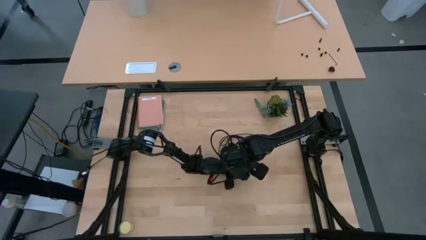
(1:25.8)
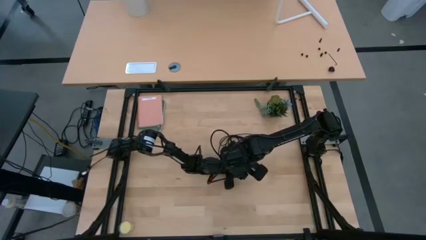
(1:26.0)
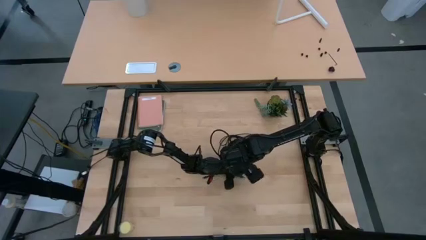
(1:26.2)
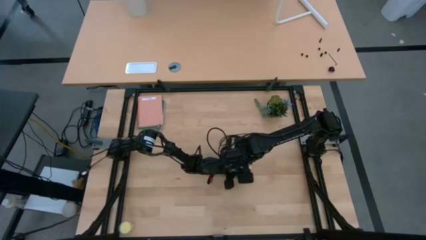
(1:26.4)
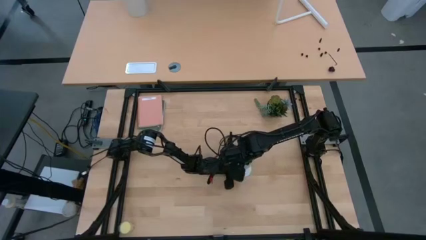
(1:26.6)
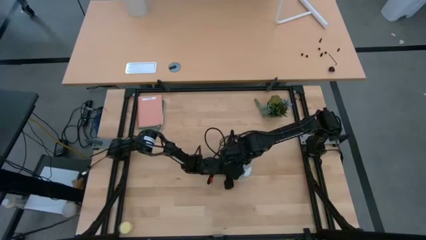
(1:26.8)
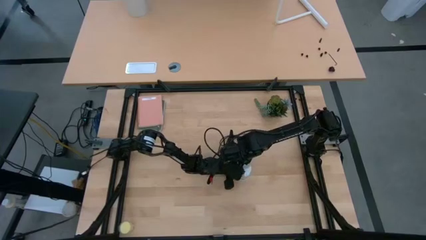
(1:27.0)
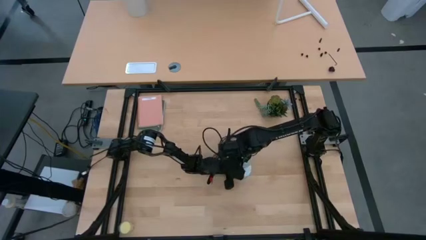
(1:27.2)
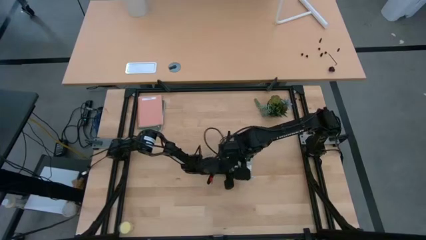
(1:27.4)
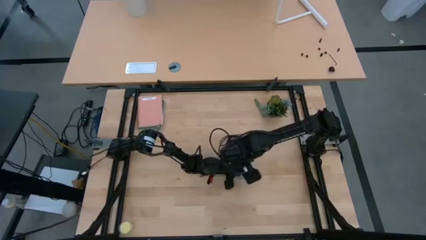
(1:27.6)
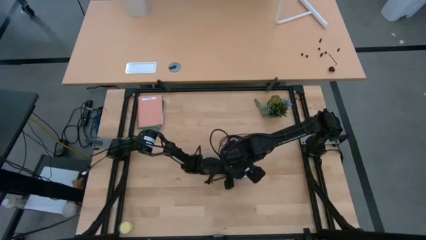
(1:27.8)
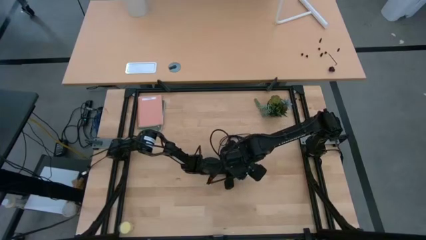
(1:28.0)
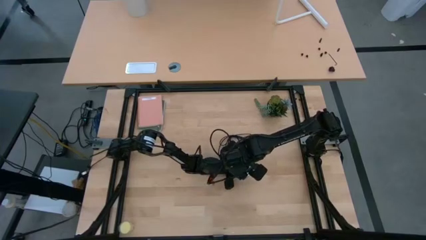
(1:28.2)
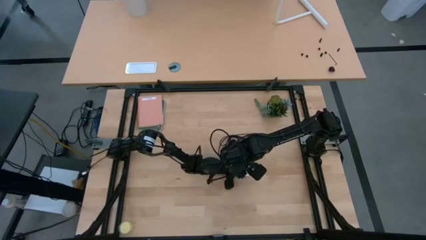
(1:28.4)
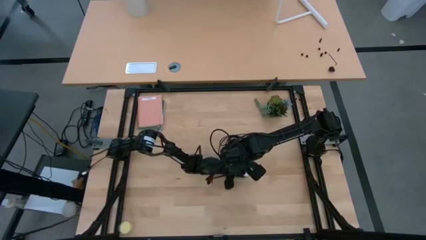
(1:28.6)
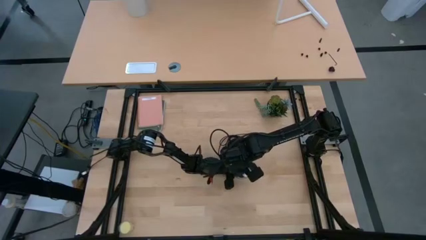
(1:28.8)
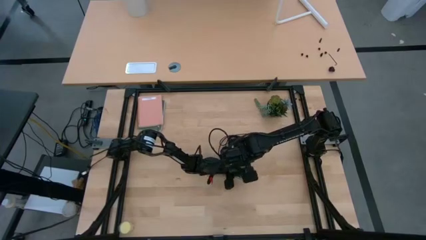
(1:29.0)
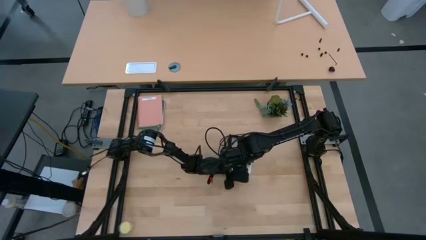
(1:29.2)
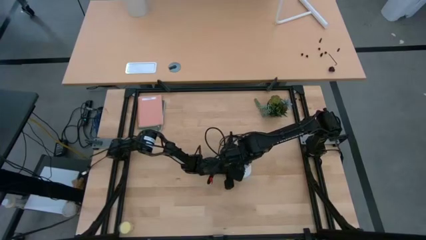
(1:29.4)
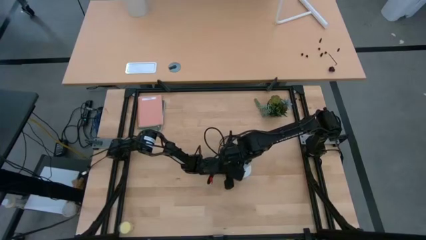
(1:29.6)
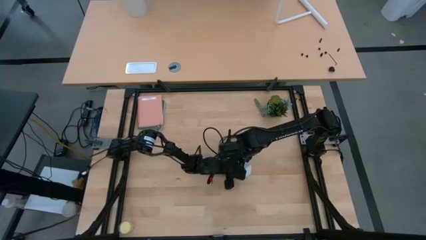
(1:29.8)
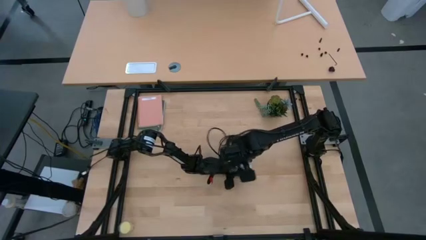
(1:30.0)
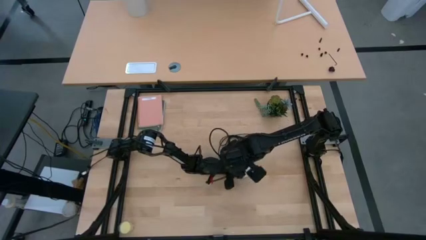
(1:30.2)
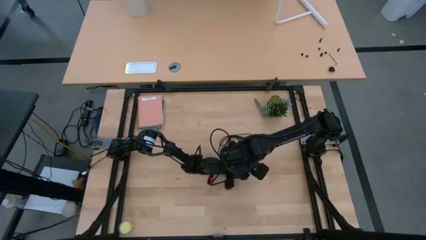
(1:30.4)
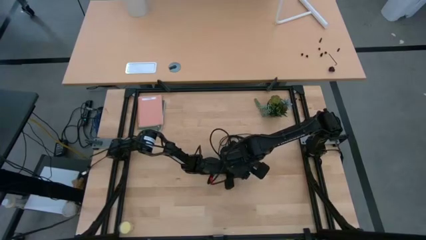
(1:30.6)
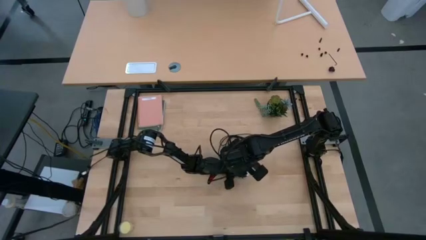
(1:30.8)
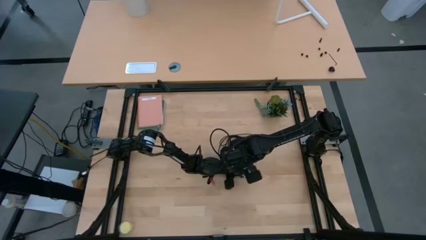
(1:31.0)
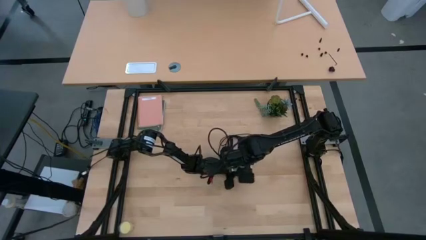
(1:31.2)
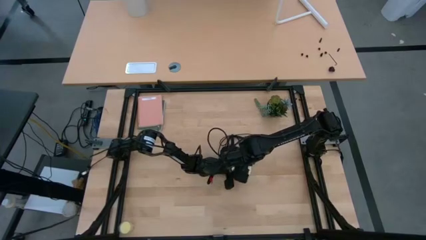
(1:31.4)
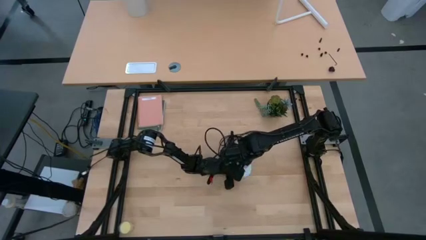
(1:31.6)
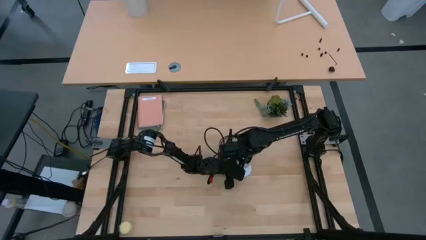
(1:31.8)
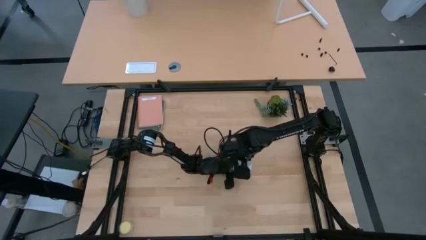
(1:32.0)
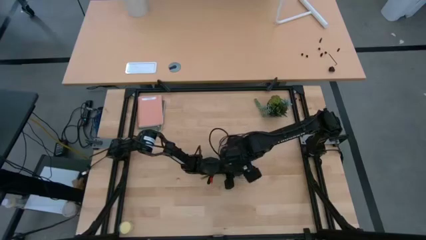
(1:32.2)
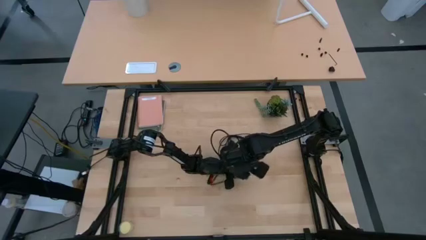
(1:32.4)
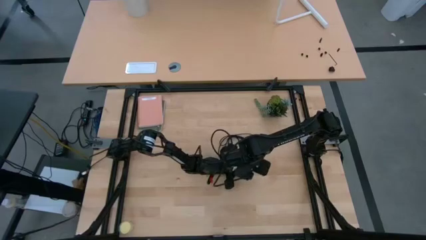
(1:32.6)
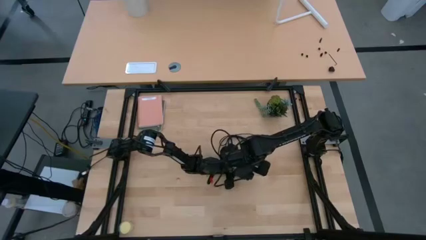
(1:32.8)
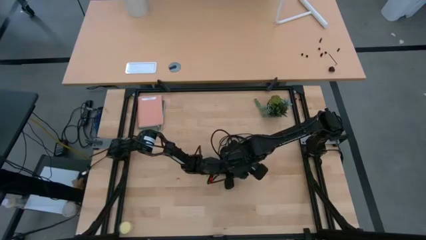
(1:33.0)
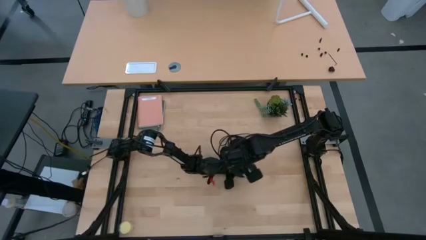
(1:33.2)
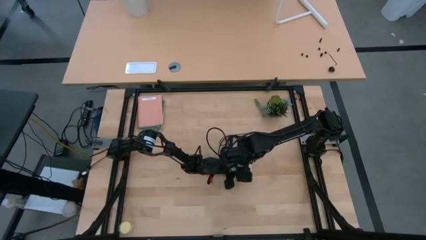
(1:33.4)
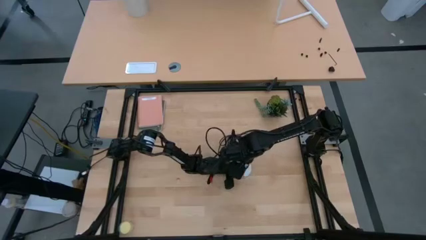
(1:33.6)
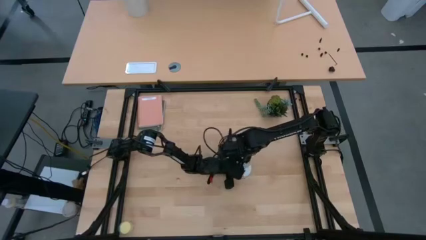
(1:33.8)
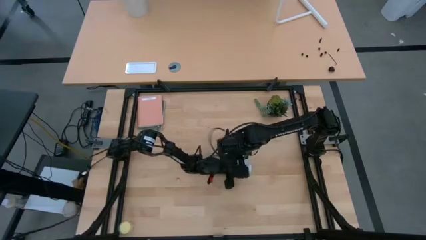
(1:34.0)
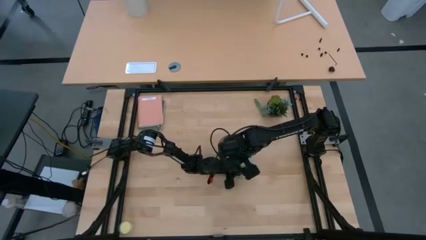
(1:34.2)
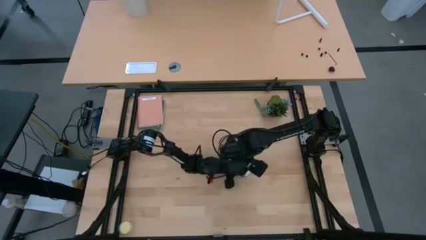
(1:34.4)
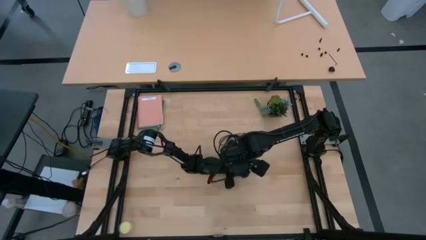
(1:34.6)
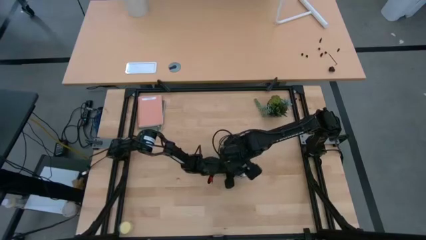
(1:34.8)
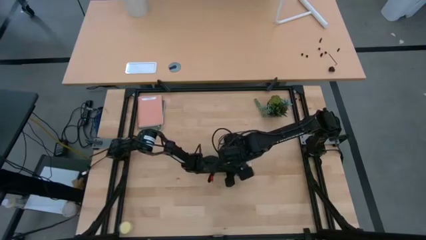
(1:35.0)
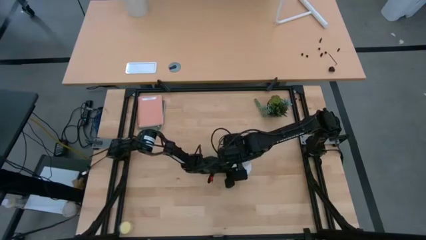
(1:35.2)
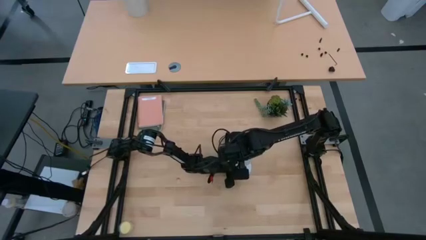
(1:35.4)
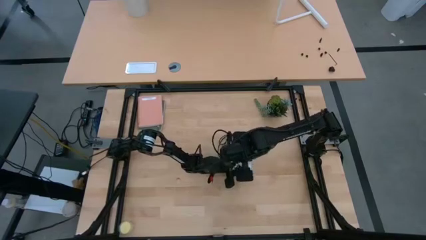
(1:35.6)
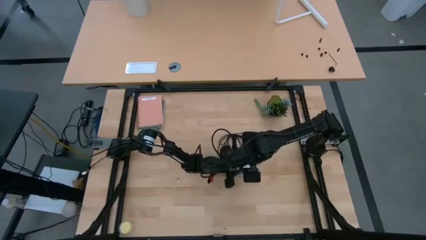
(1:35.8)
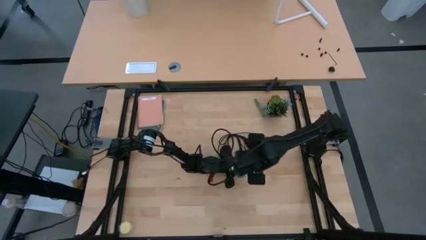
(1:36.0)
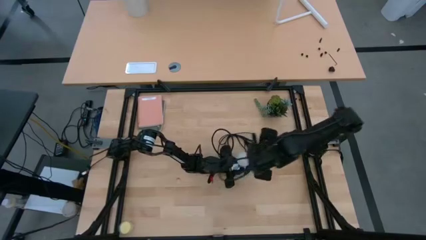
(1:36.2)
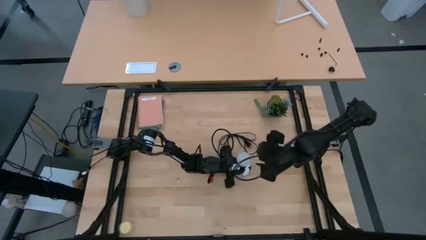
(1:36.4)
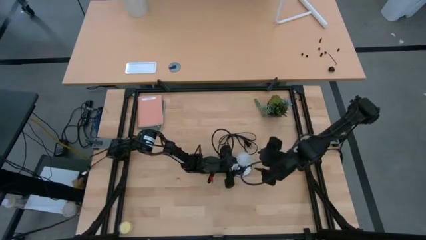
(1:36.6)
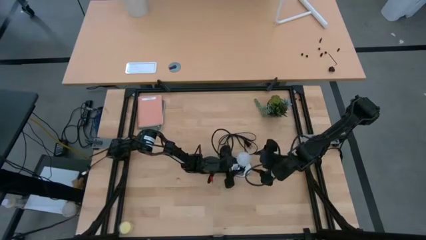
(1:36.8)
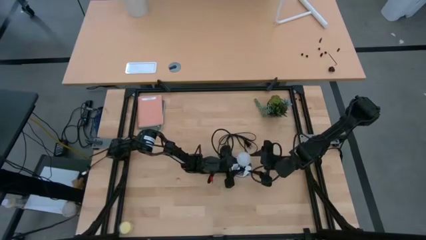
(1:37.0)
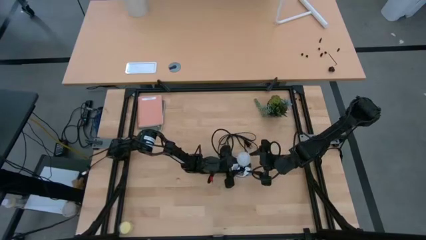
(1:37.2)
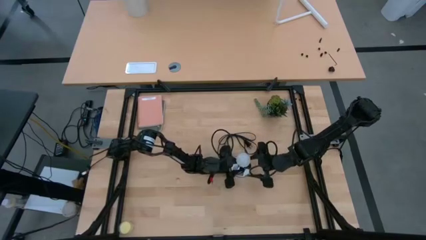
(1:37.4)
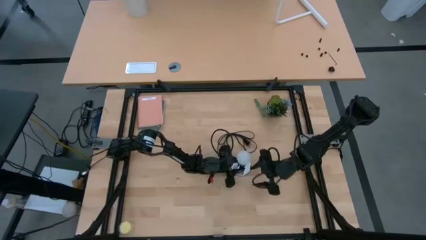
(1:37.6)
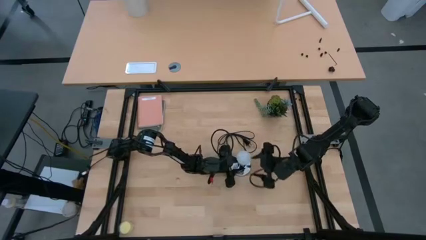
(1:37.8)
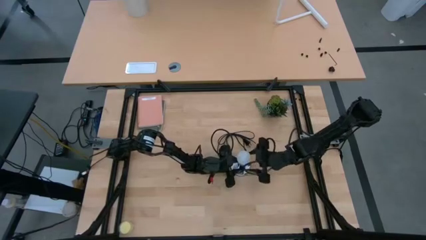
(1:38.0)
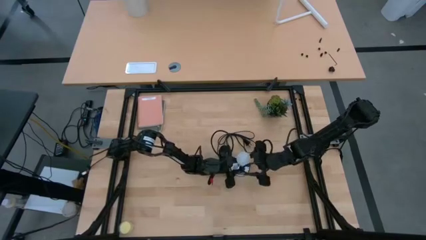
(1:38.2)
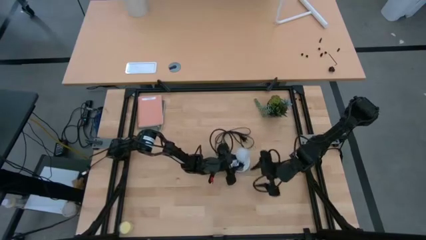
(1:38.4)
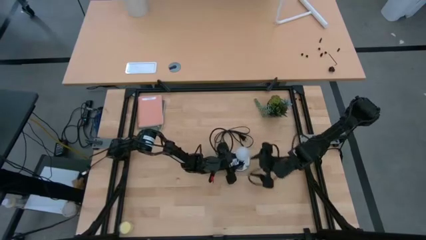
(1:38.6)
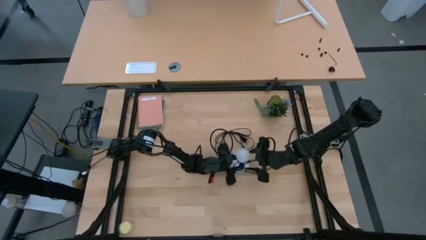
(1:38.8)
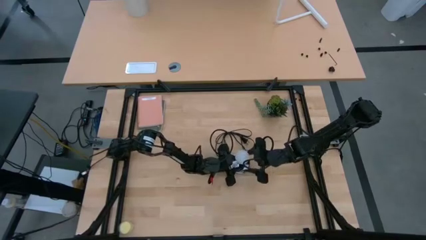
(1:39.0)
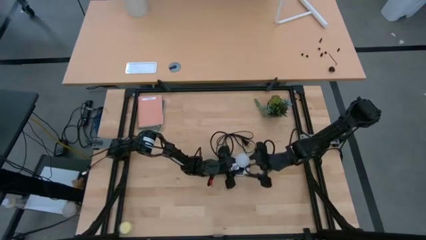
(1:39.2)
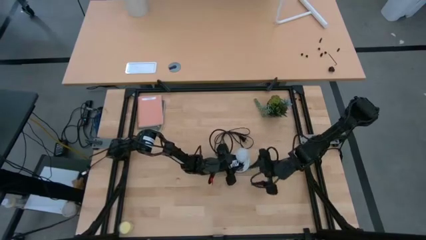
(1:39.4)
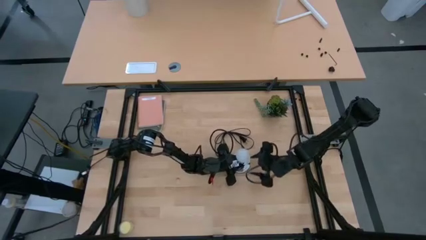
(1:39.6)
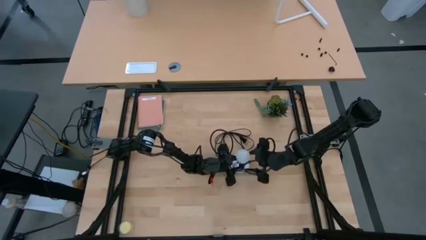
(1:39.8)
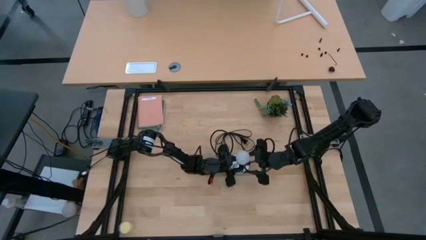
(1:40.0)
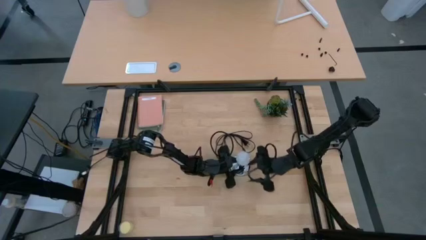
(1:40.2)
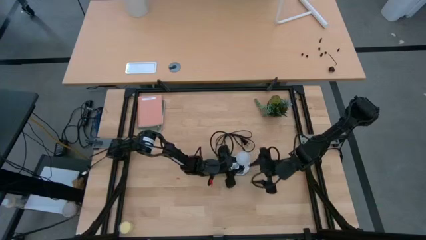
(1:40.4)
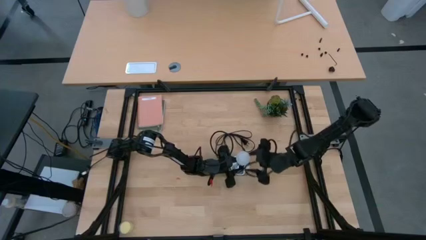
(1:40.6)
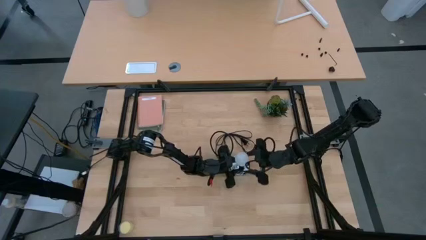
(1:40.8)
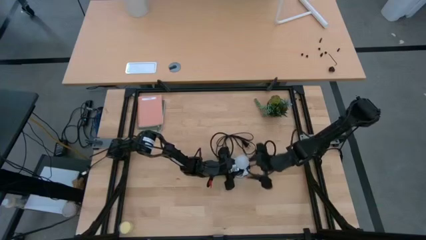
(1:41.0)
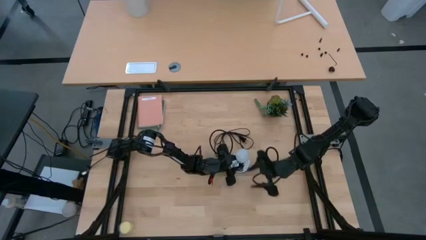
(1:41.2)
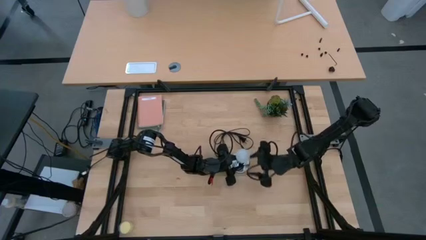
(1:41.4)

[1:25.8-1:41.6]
Task: Screw lightbulb
Insert the white lightbulb into the silver lamp
